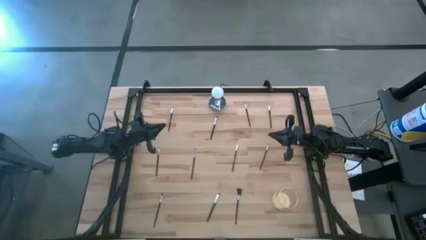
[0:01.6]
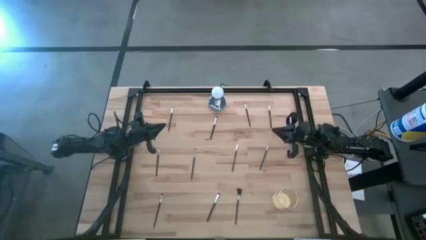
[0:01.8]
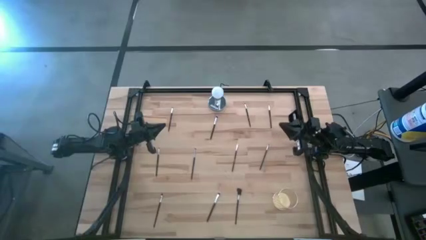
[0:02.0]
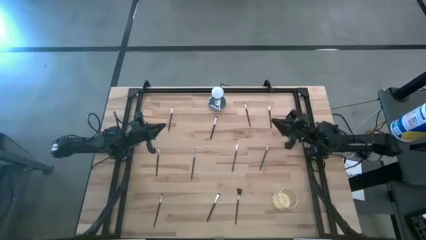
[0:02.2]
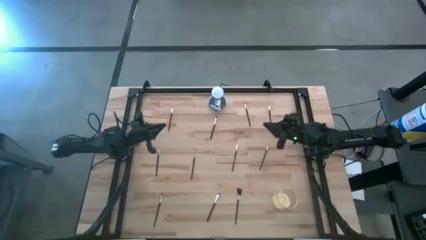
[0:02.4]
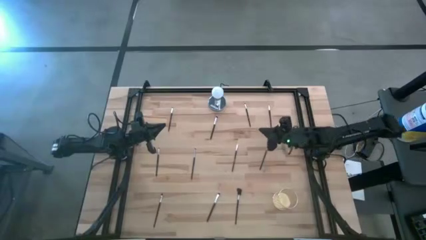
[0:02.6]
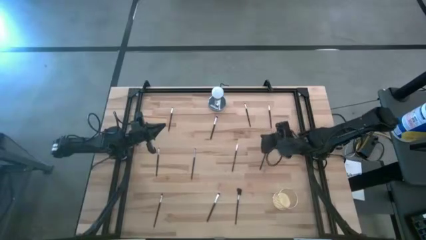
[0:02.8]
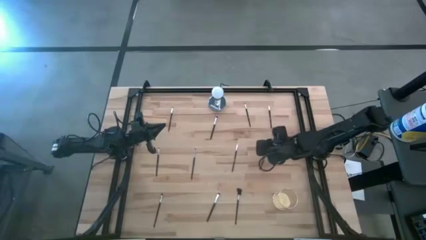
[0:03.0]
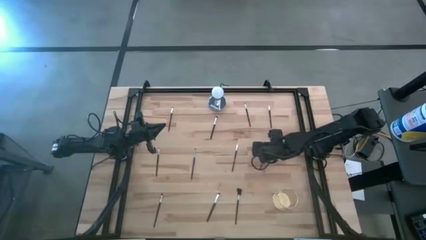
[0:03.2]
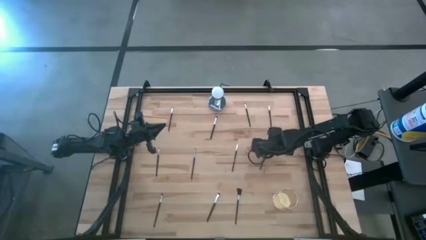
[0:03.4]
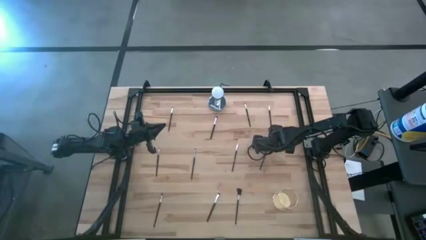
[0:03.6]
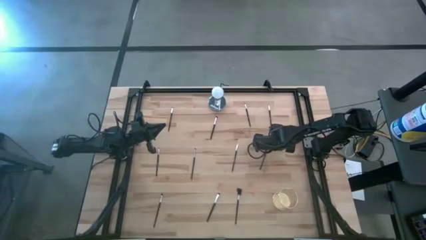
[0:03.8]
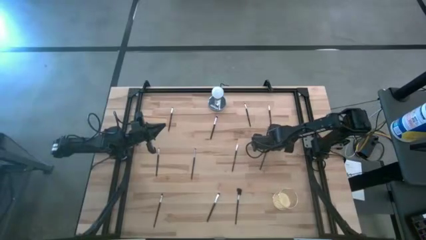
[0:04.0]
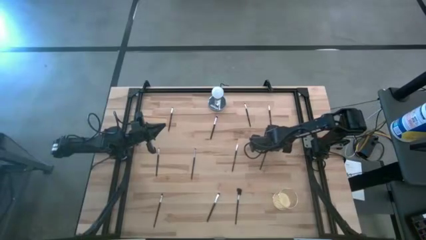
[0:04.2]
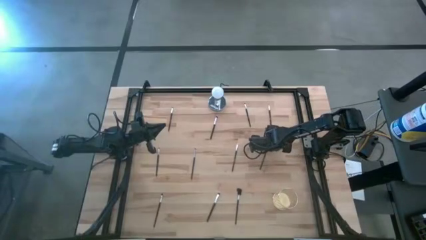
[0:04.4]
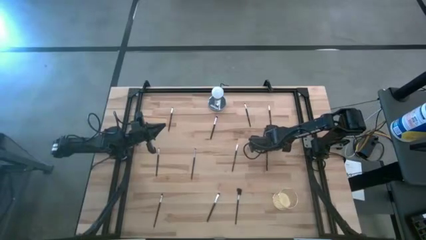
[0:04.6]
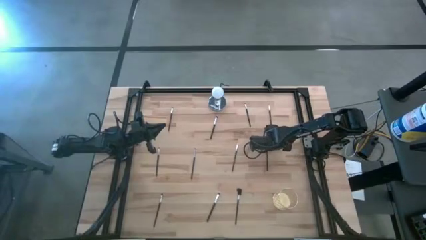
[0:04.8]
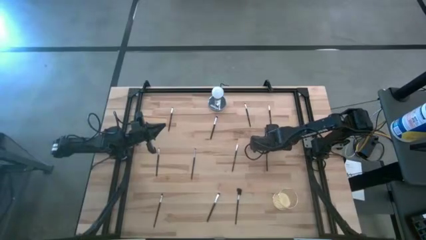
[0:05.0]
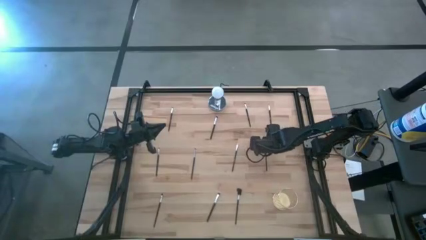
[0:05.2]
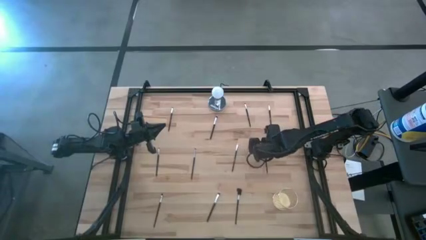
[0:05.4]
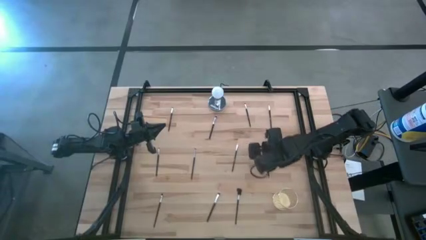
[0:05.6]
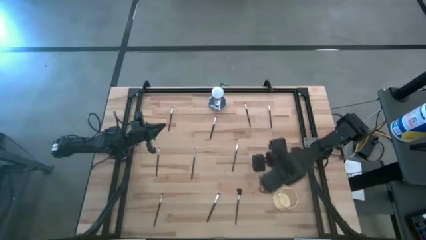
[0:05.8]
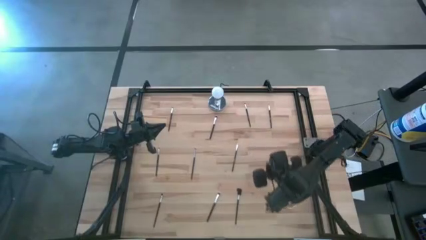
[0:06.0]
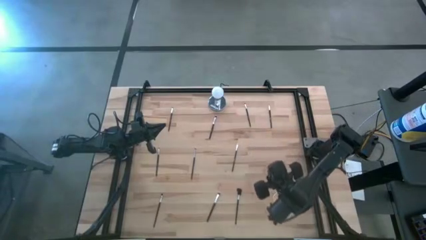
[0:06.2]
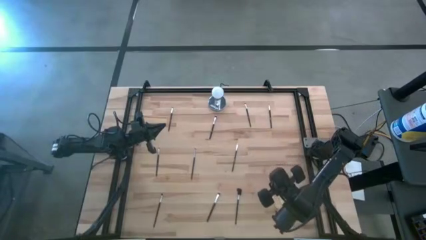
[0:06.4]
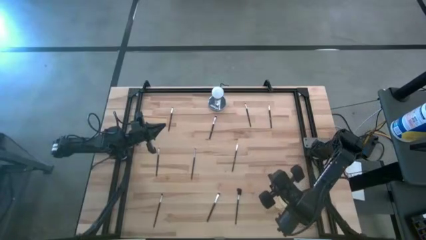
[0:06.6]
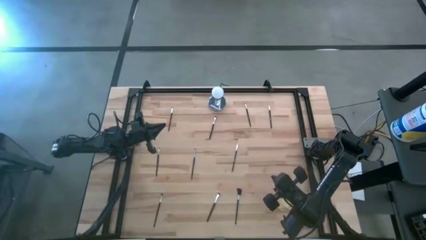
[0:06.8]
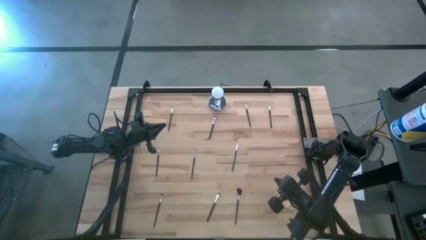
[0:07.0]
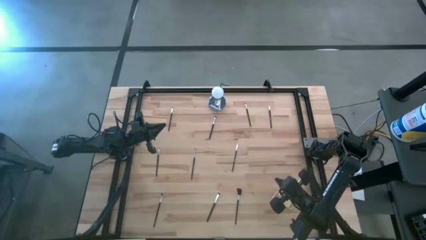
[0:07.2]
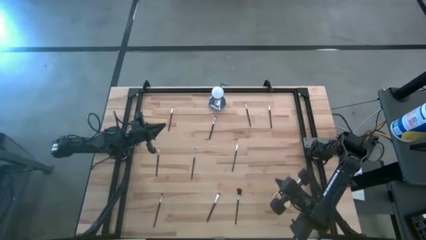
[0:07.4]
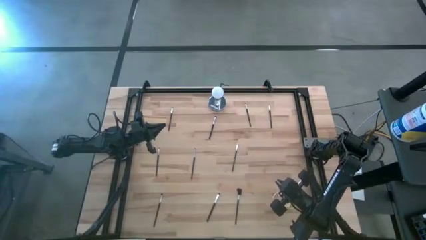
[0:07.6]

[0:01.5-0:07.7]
Task: Pick & Place Makeup Supplies
Put the silver makeup brush into the gold makeup holder

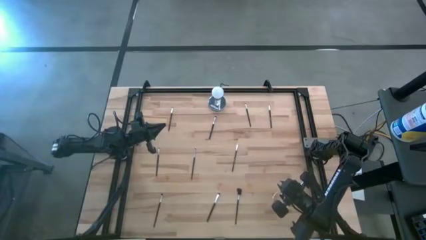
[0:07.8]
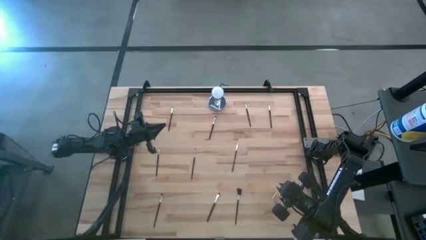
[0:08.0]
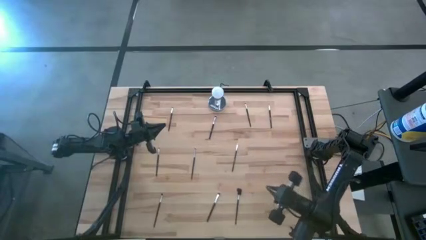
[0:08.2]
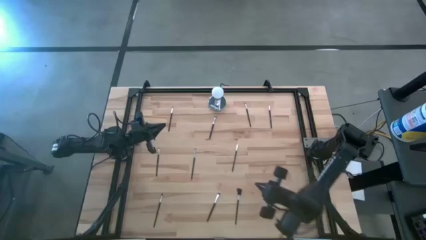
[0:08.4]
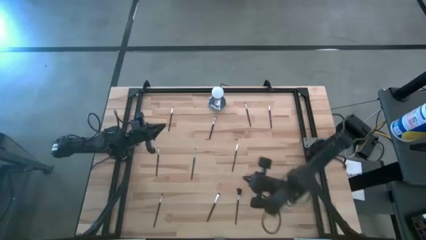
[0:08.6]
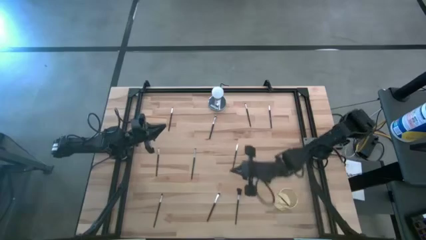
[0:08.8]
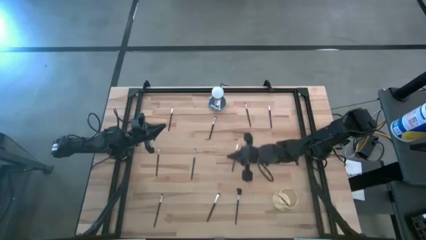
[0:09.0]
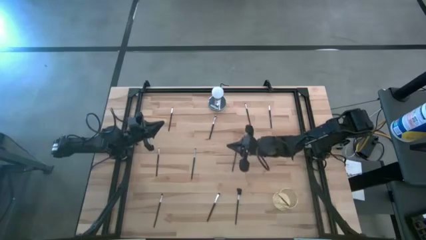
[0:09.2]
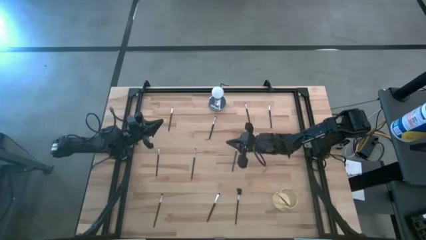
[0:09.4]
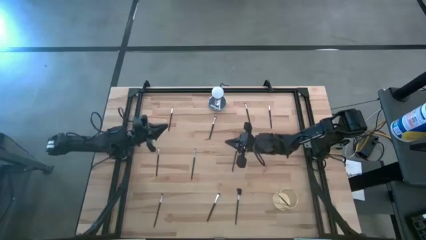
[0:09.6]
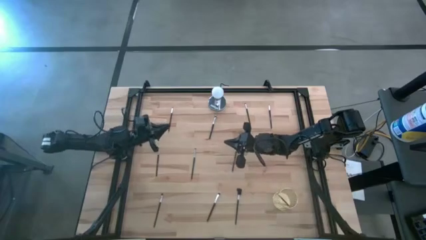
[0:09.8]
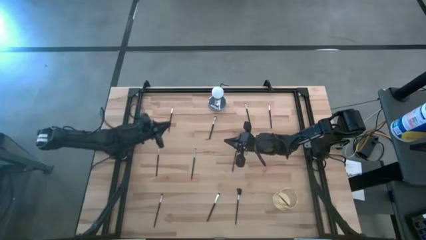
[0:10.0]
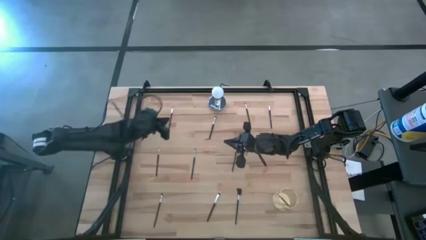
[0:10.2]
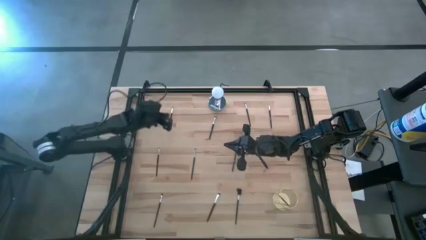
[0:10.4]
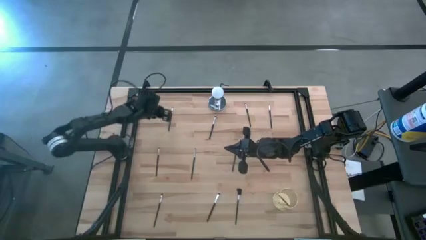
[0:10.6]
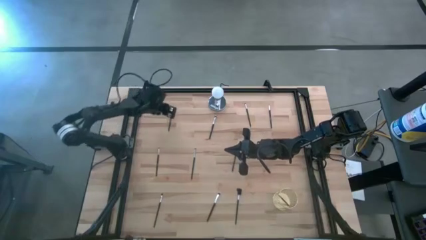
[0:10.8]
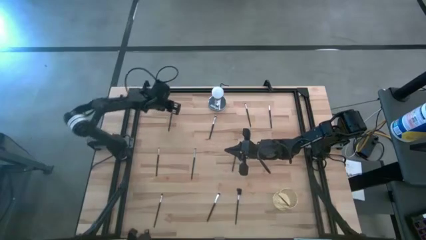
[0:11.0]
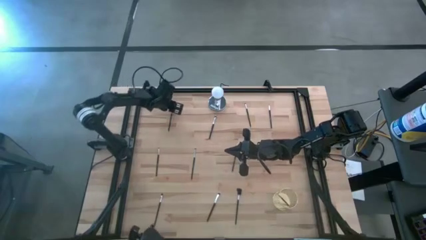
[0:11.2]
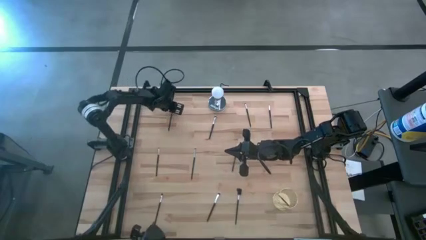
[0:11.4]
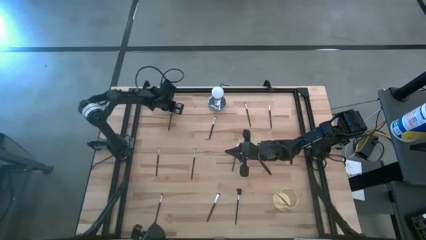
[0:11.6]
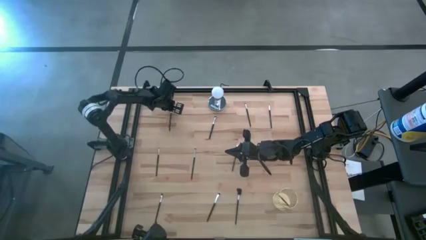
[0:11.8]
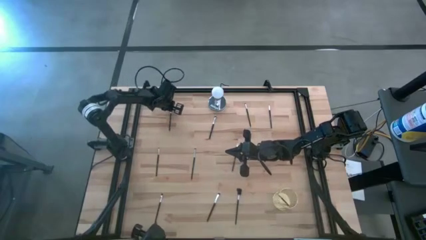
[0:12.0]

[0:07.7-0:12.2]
Put the silver makeup brush into the gold makeup holder

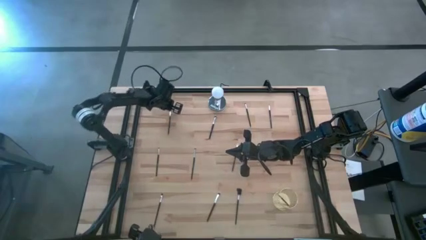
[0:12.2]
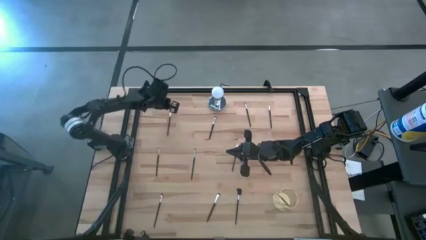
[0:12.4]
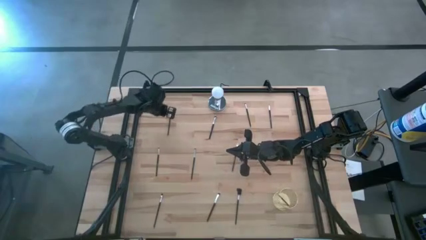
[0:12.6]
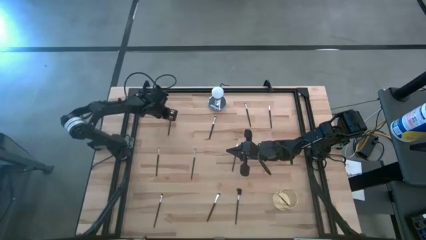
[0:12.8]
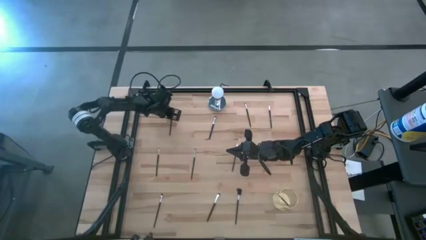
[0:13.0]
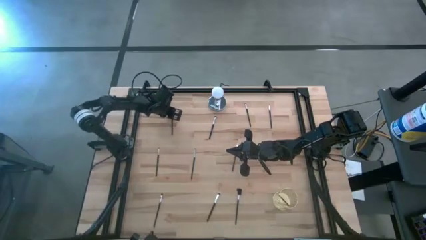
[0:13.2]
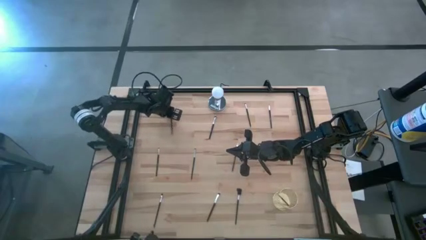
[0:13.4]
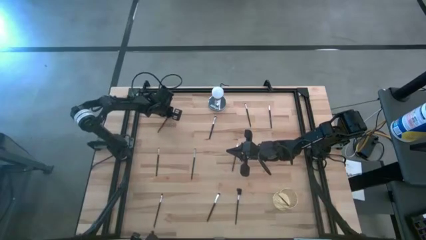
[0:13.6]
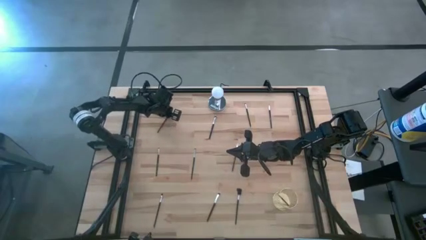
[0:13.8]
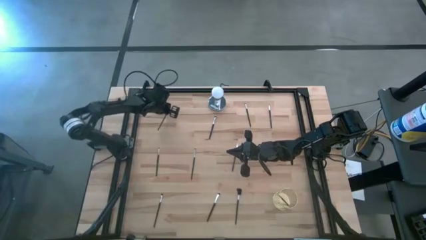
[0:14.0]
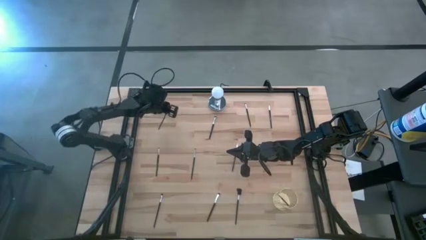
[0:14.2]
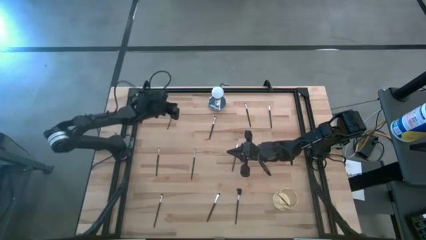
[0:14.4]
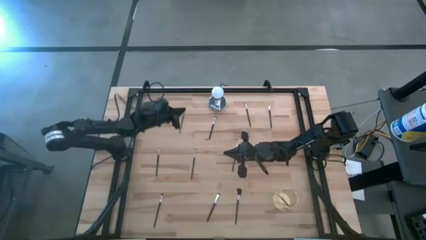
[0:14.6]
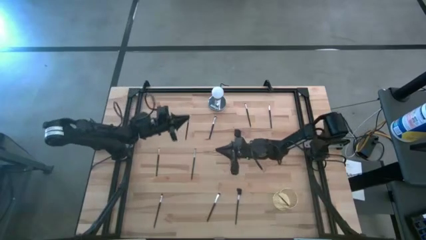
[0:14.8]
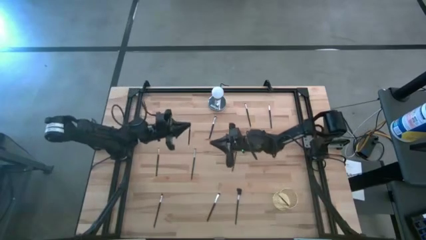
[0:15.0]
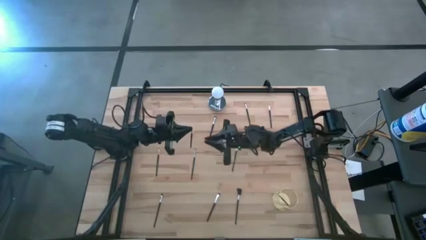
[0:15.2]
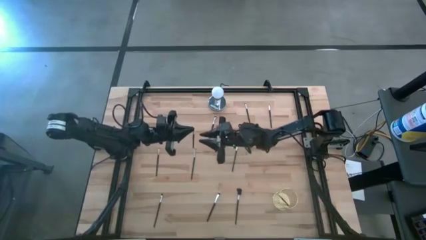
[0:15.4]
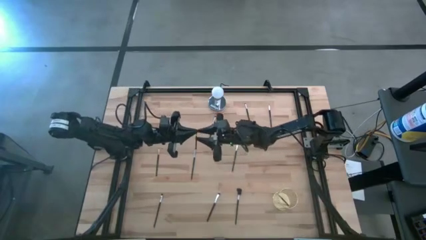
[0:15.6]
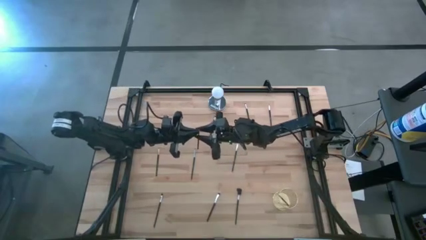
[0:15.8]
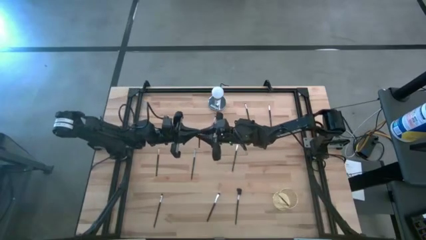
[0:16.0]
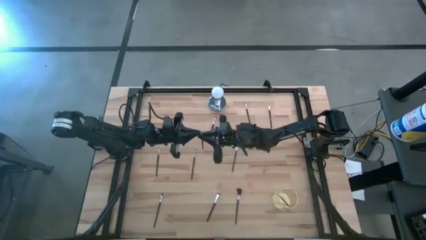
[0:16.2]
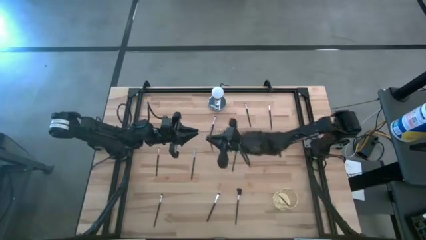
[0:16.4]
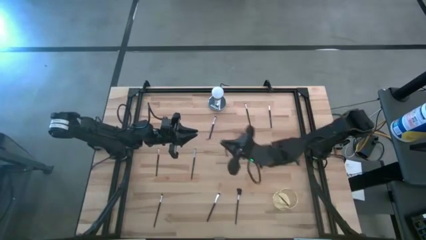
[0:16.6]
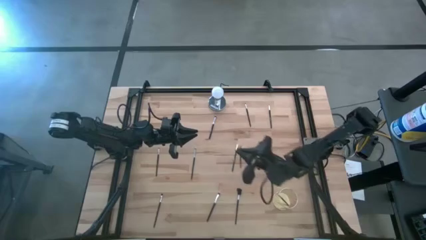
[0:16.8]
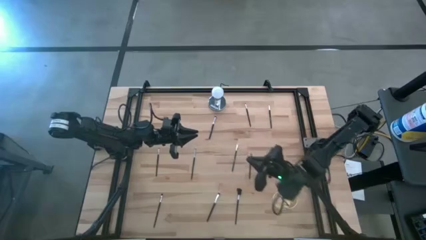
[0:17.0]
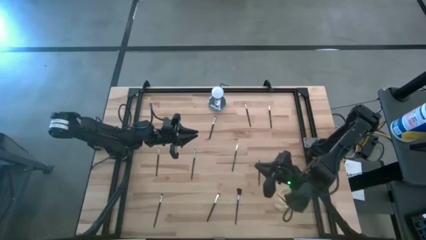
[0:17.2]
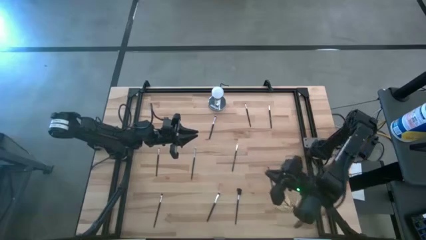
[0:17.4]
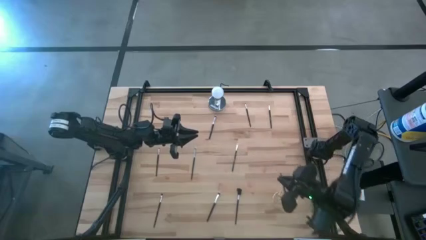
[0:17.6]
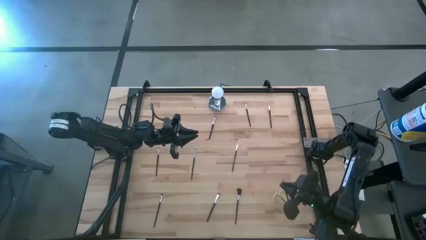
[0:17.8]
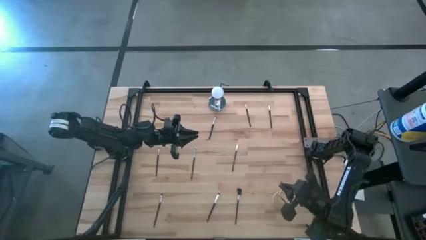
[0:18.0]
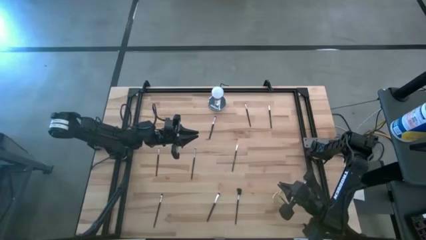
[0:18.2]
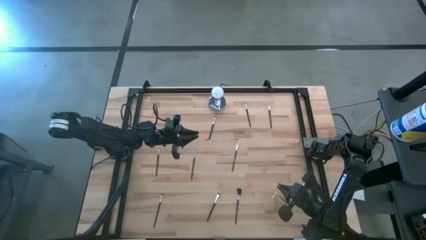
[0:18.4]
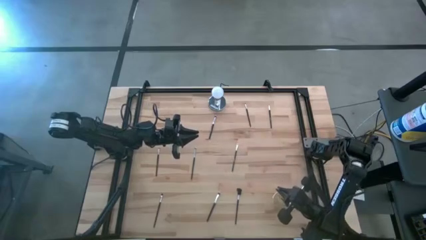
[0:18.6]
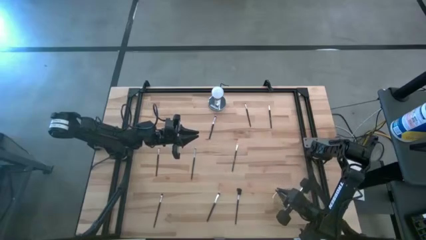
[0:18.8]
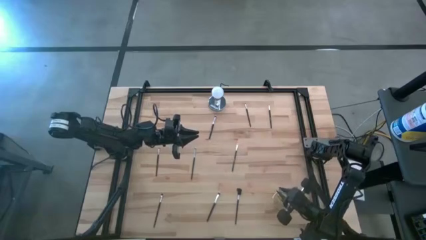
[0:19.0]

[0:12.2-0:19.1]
Put the silver makeup brush into the gold makeup holder
